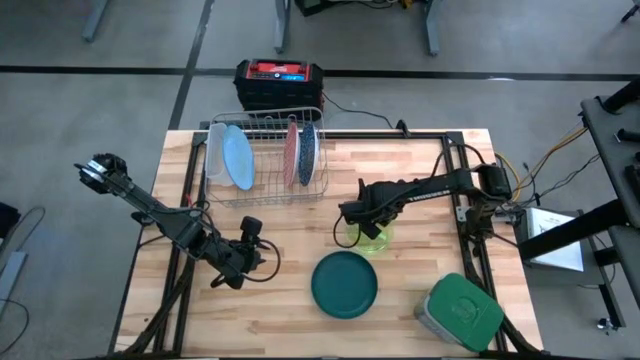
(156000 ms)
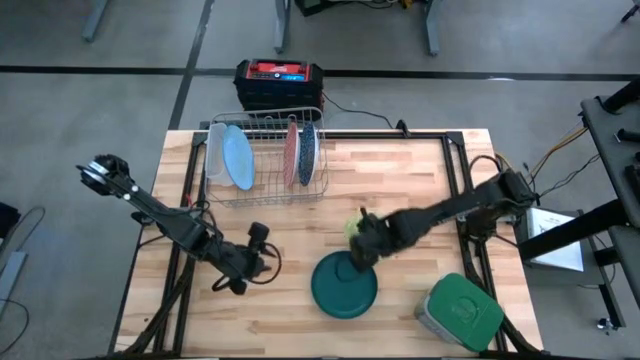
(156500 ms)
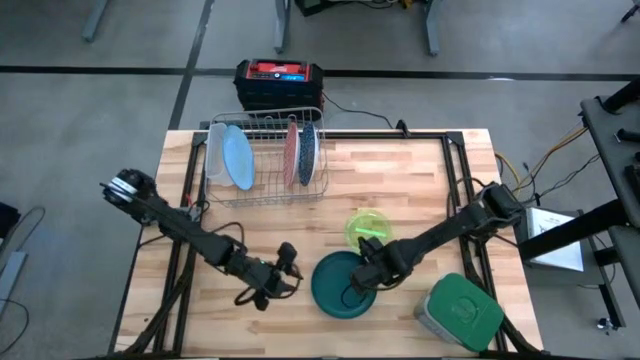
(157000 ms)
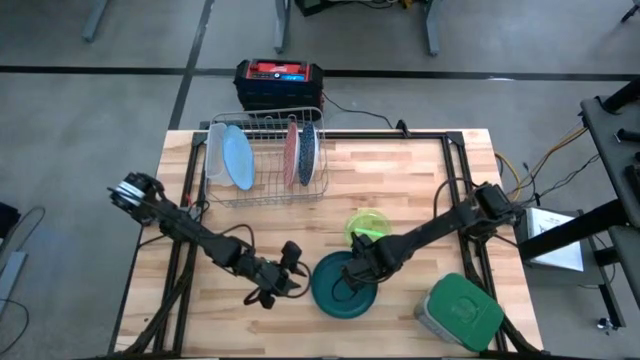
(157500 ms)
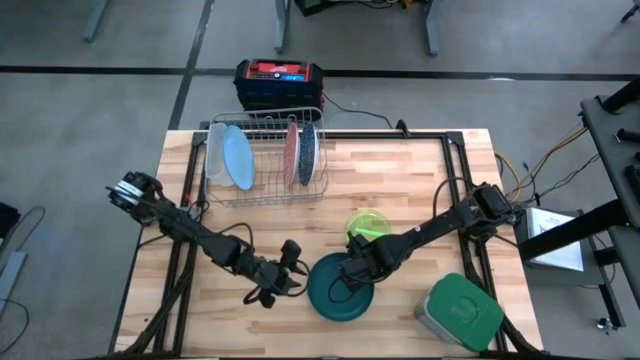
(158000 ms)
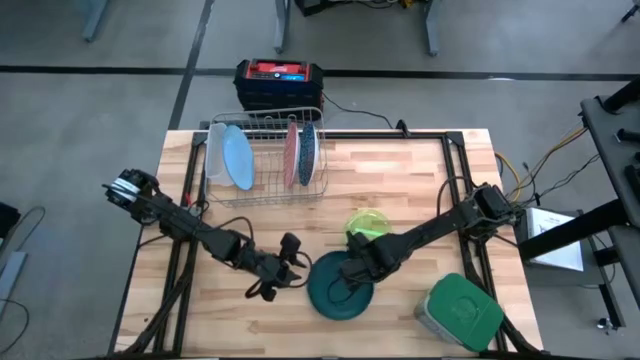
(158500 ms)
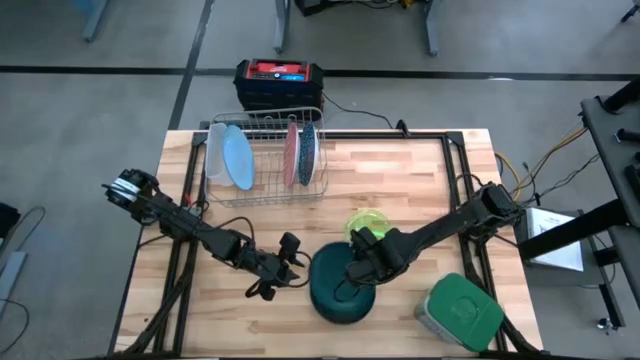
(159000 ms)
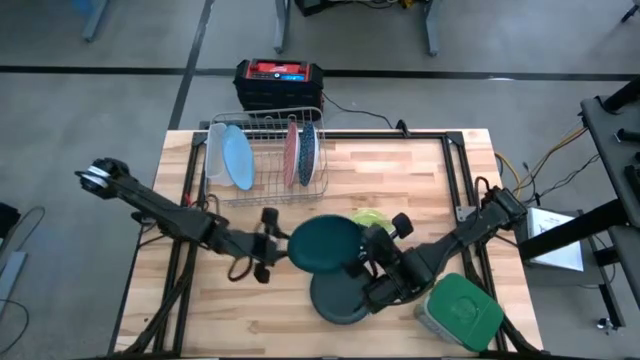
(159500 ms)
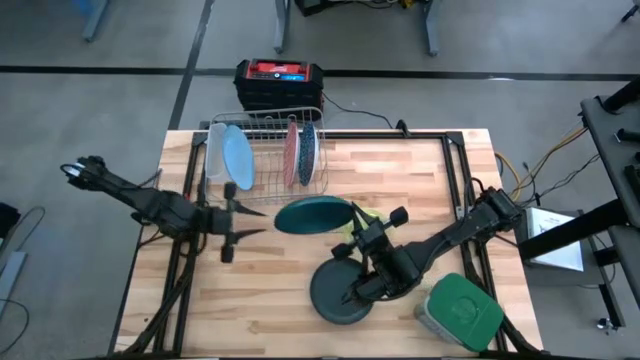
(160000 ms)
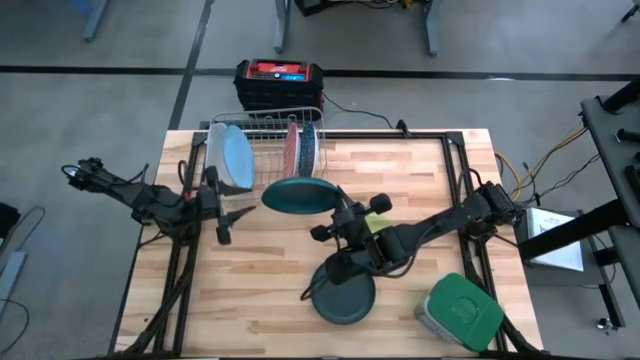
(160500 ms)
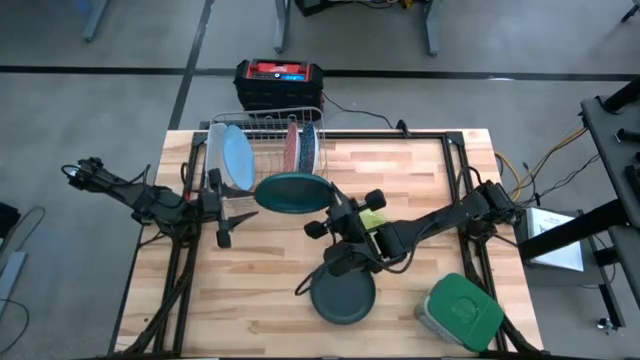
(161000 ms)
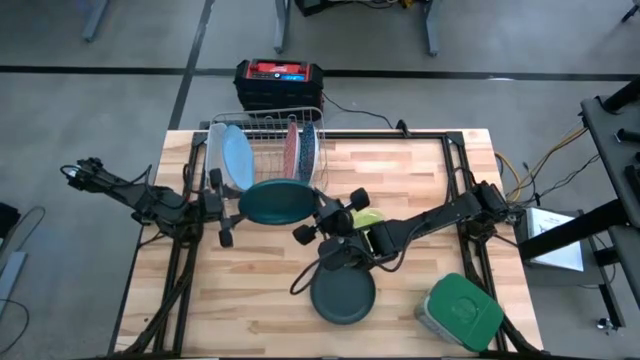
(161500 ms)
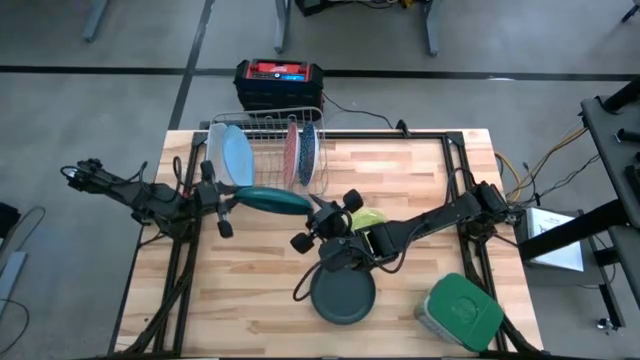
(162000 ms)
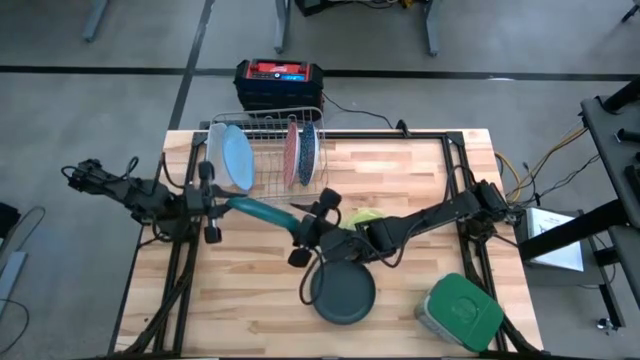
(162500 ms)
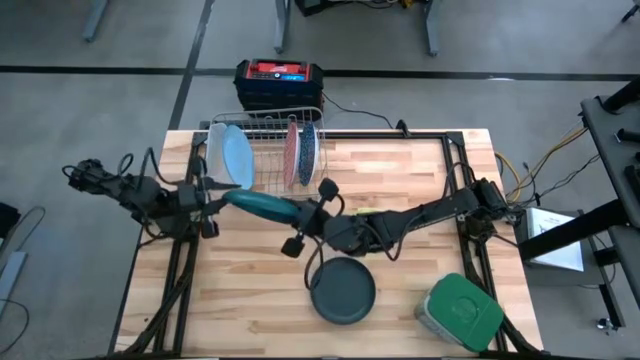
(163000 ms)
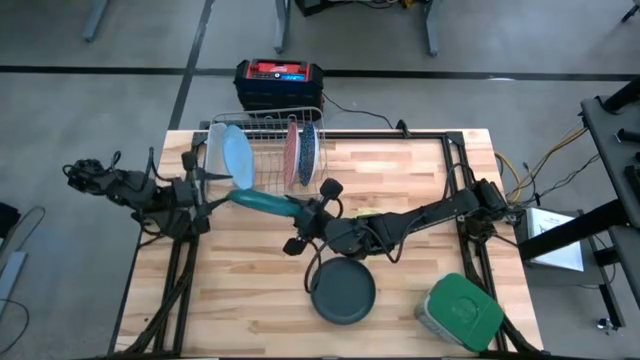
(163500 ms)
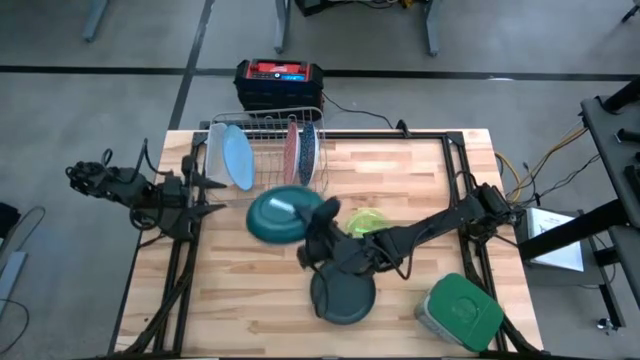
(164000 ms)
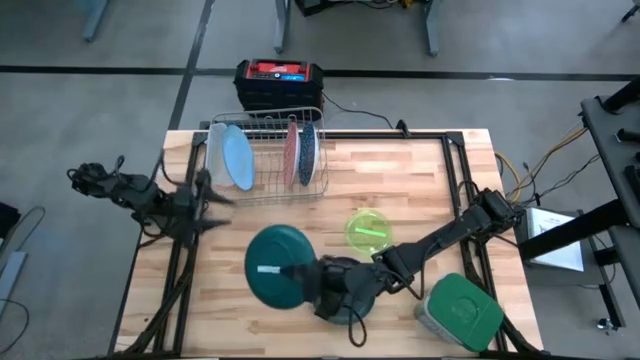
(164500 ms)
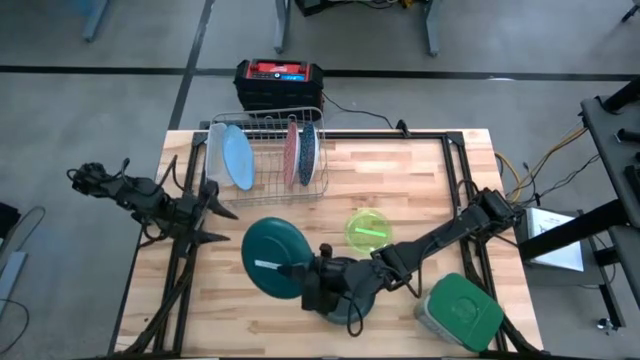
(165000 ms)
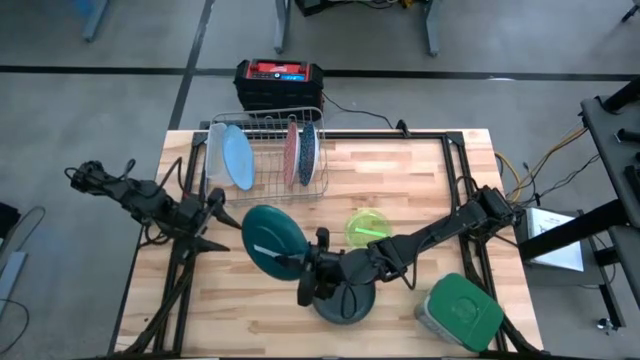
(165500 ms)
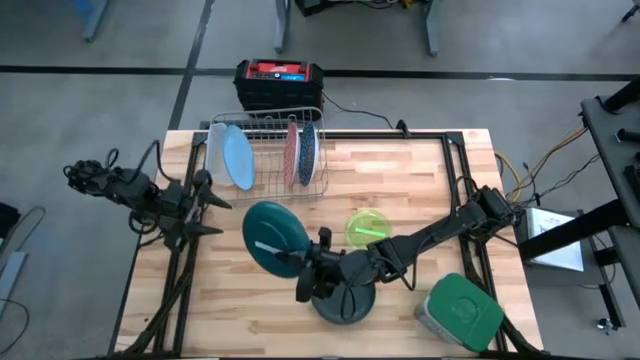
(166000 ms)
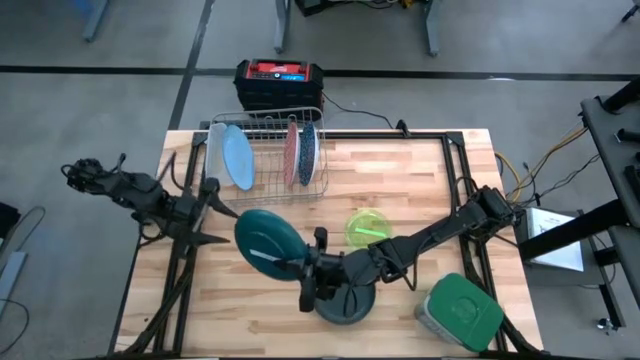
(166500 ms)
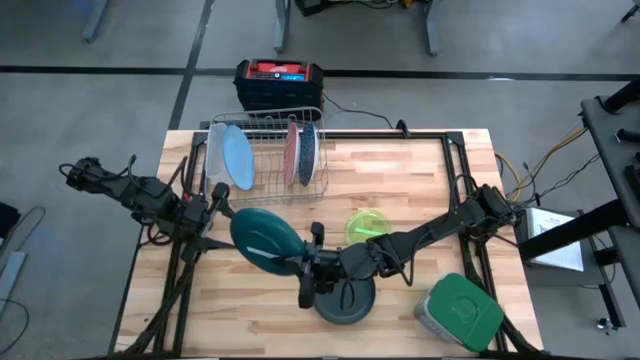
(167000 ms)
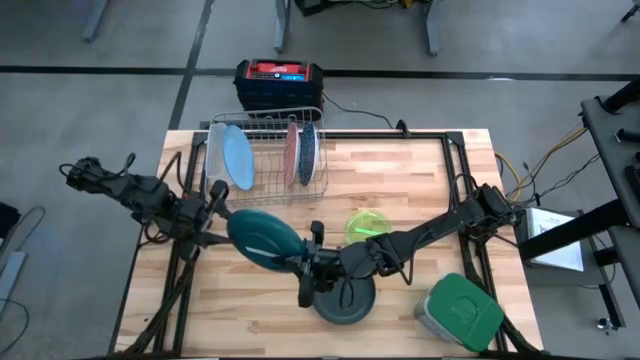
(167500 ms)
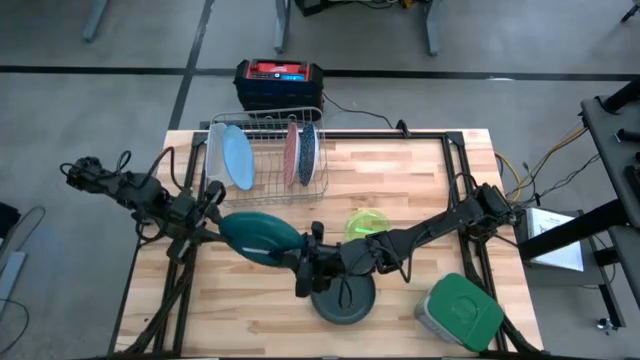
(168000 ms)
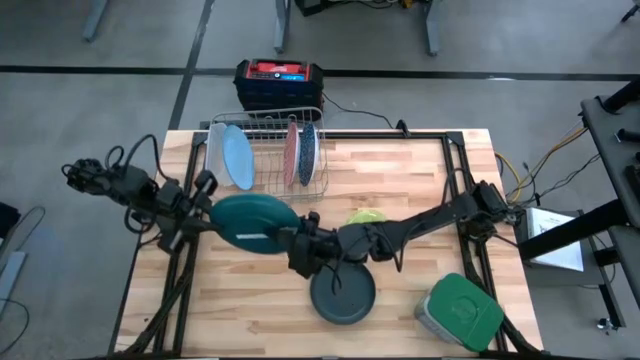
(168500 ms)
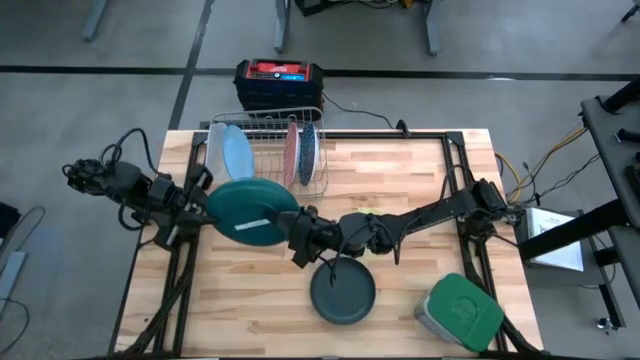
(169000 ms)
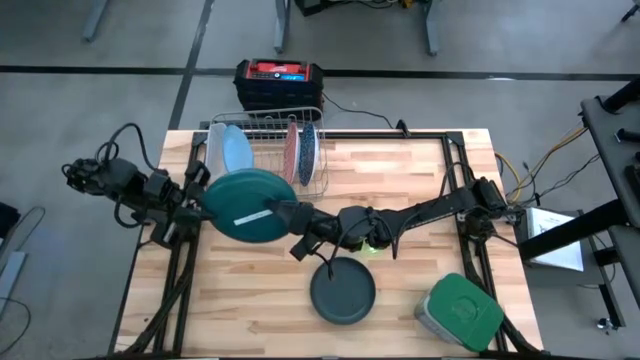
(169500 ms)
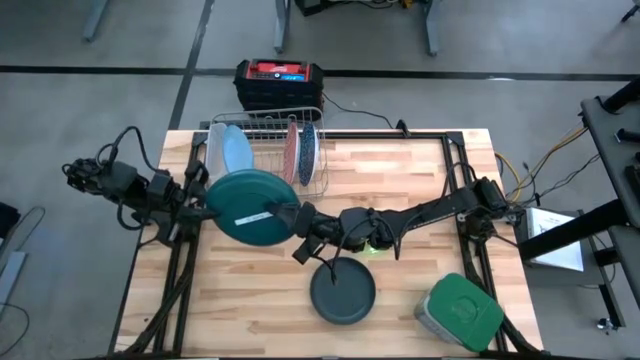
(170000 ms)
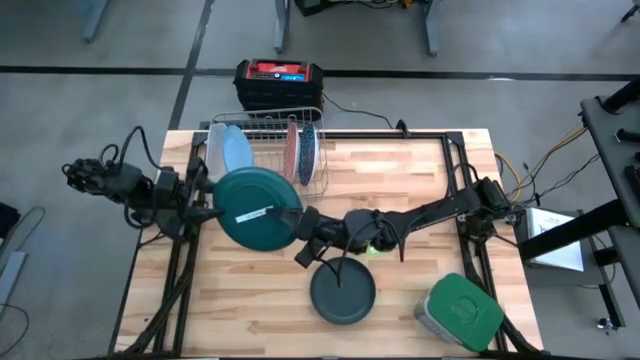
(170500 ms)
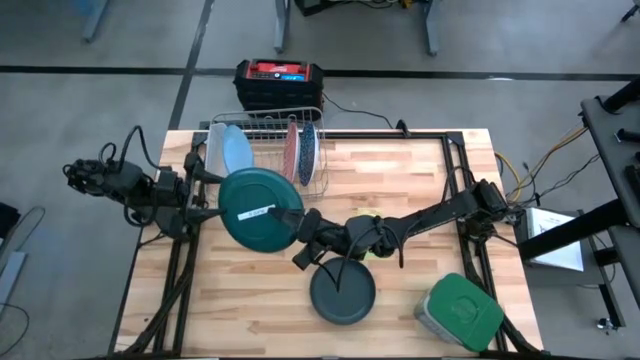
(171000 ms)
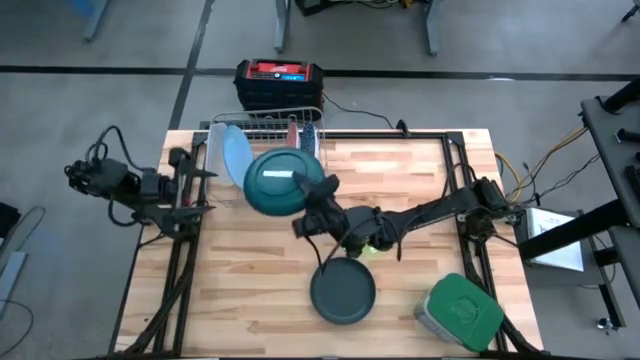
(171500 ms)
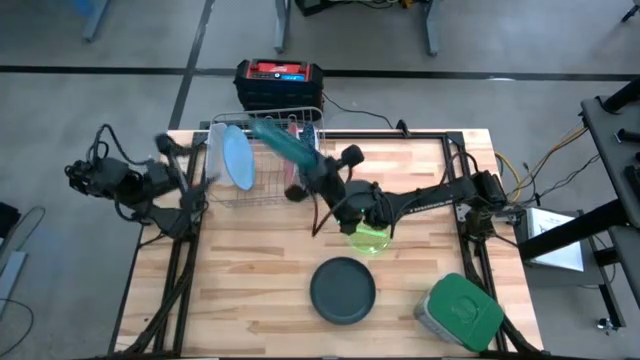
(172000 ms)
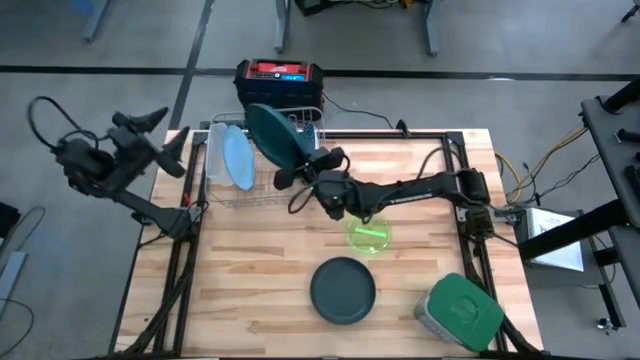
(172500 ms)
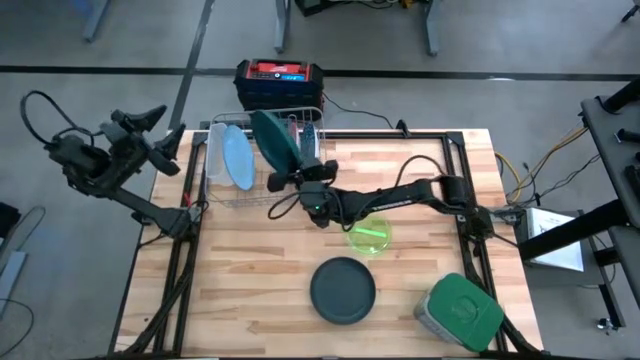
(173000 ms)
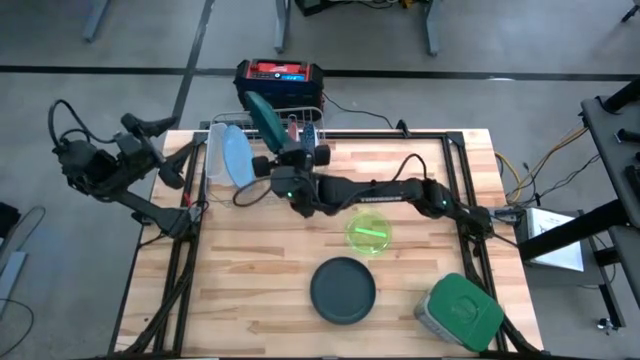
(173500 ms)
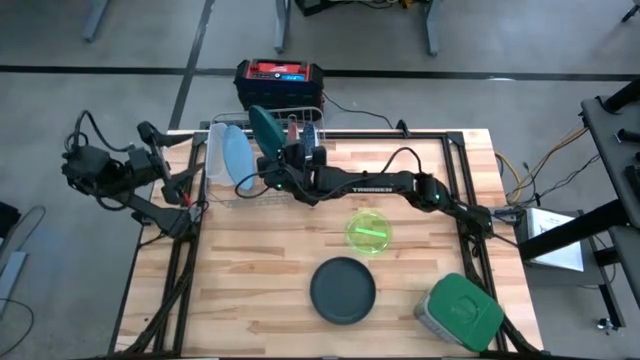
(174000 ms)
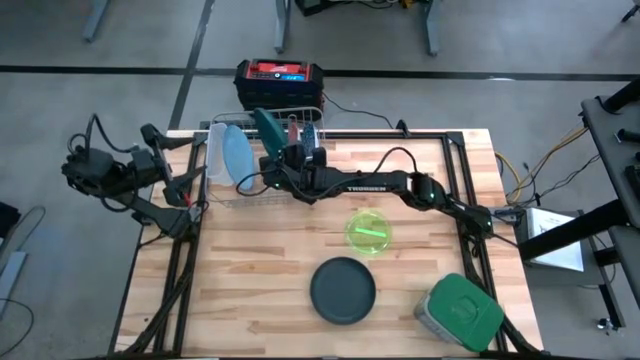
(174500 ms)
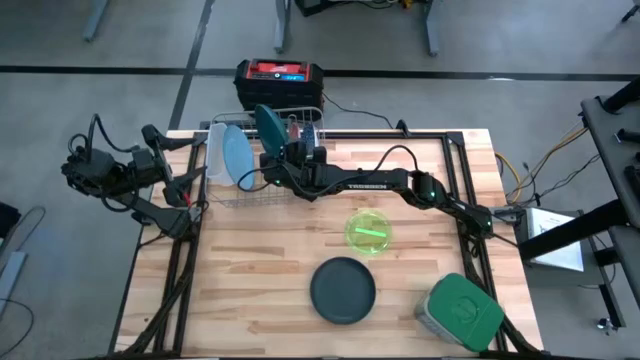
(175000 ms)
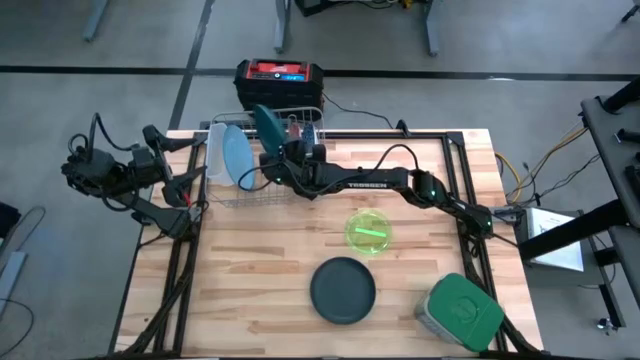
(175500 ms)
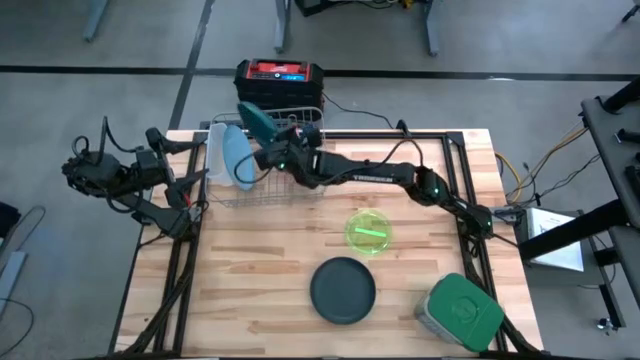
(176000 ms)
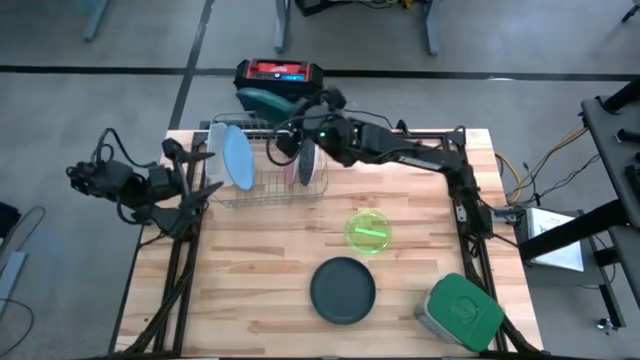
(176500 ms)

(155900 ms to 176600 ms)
Task: Sort dishes
Put the green plate into the dish rack

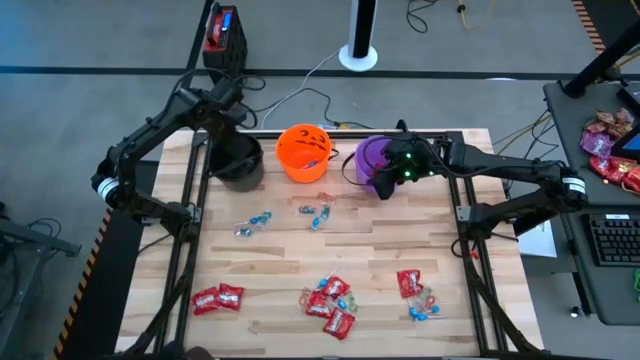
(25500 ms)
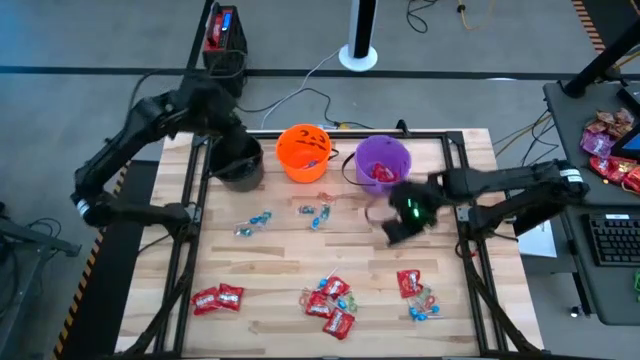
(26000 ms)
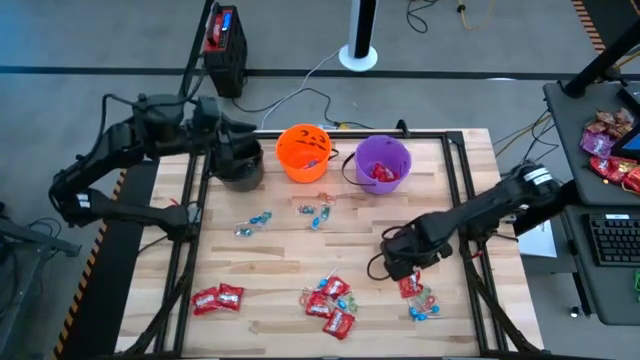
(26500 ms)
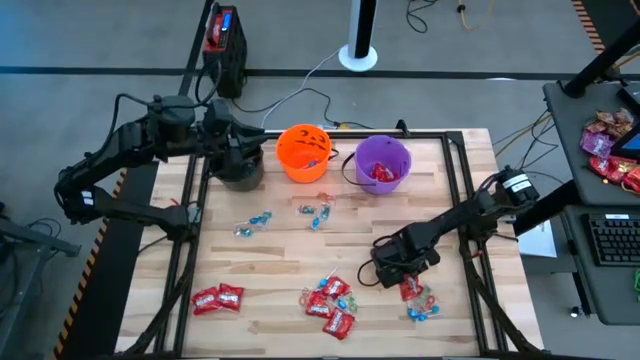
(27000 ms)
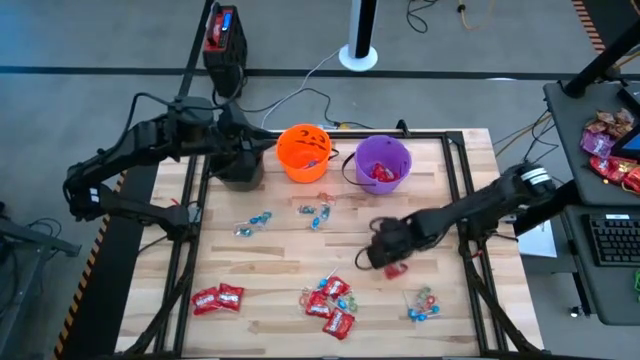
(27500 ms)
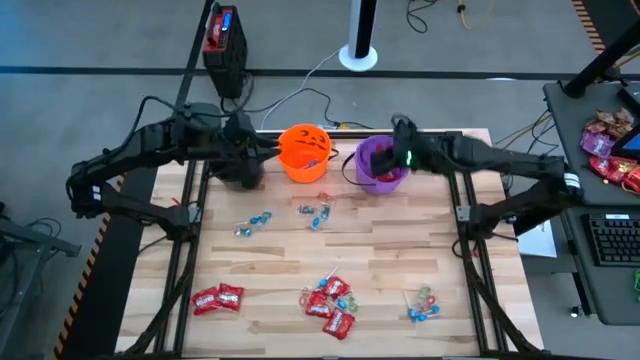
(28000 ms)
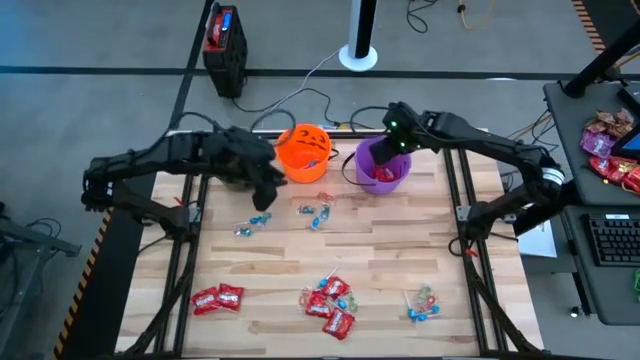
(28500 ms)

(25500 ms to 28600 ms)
Task: Sort candy by brand, put in halloween buckets
Put the red candy into the violet bucket
